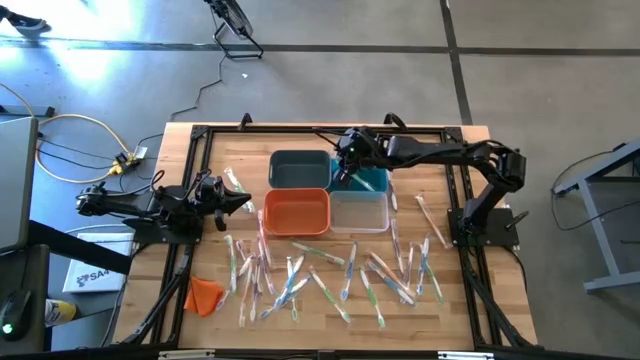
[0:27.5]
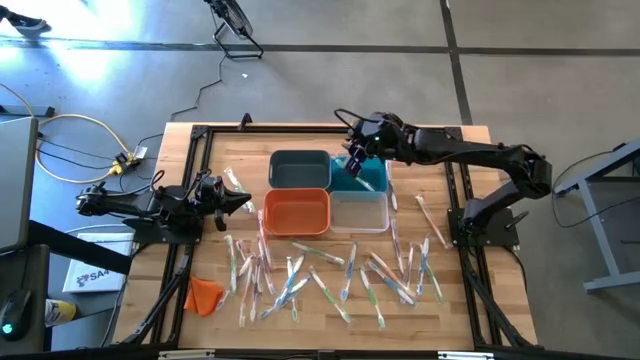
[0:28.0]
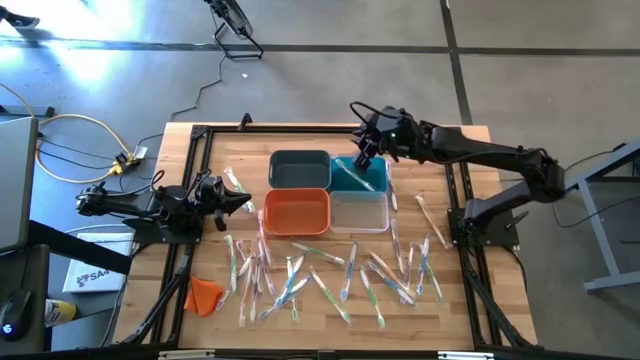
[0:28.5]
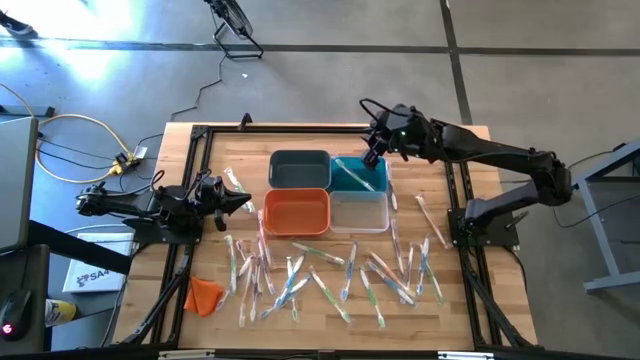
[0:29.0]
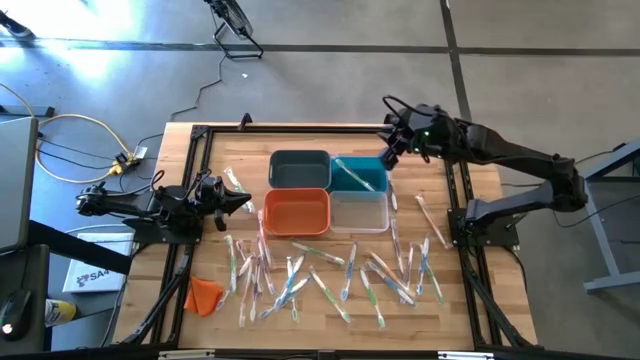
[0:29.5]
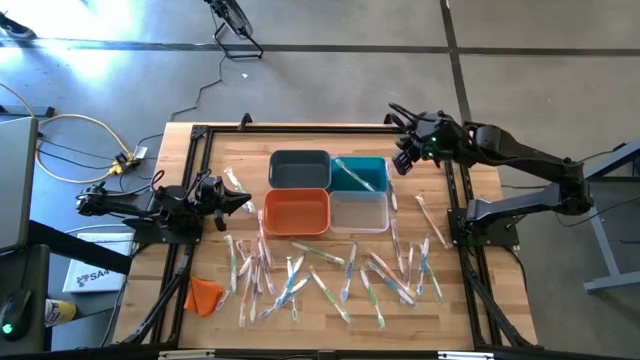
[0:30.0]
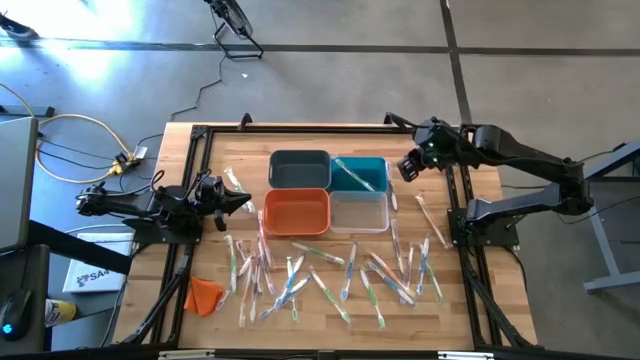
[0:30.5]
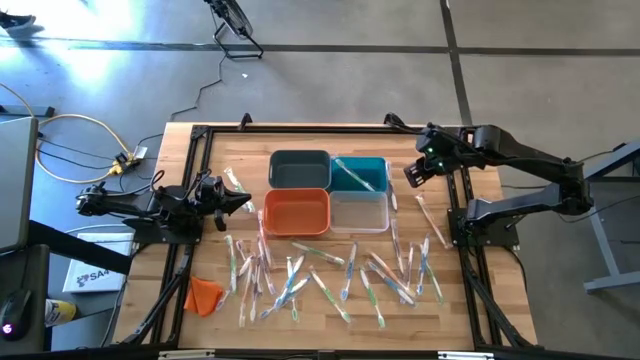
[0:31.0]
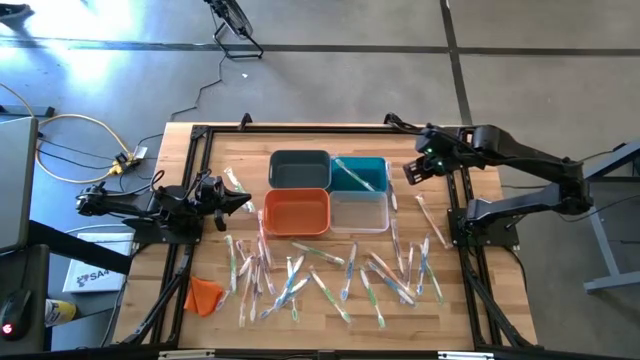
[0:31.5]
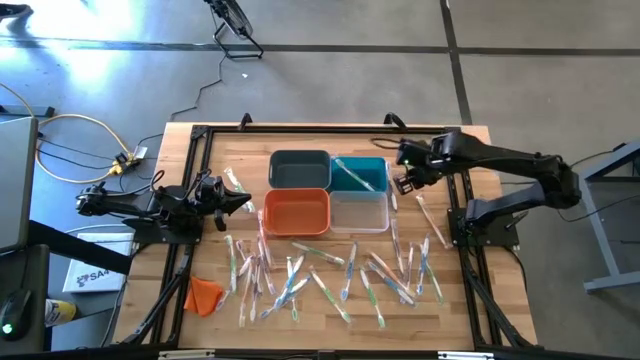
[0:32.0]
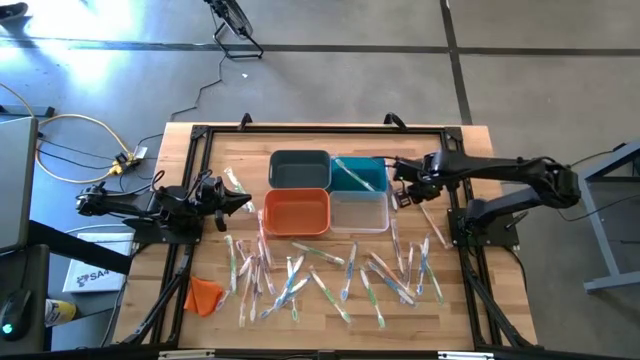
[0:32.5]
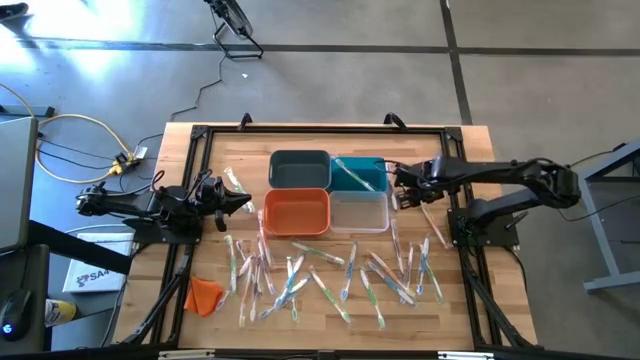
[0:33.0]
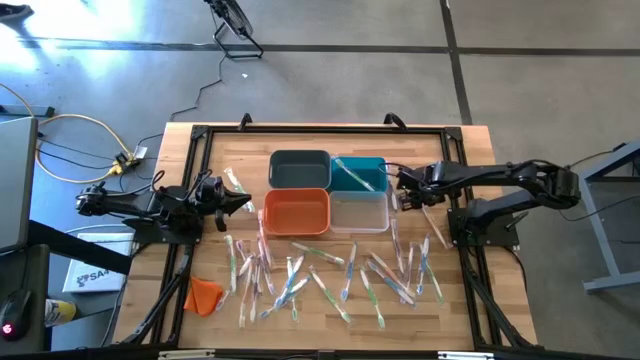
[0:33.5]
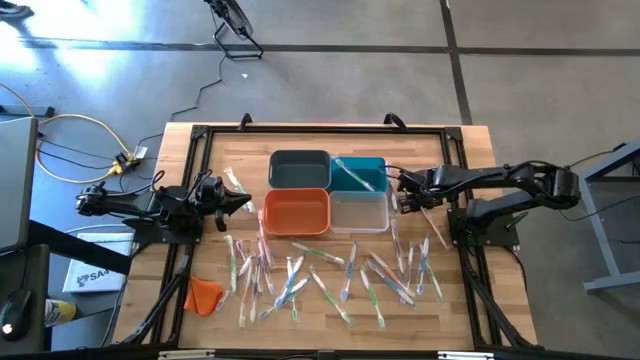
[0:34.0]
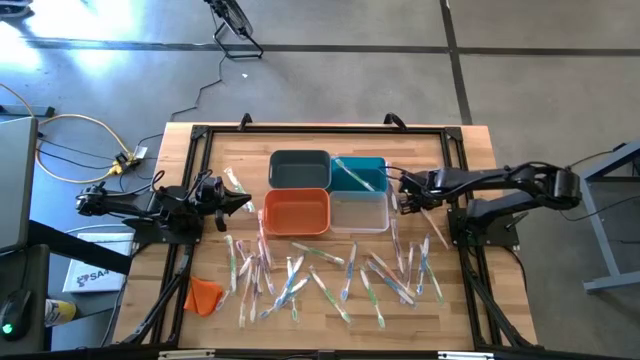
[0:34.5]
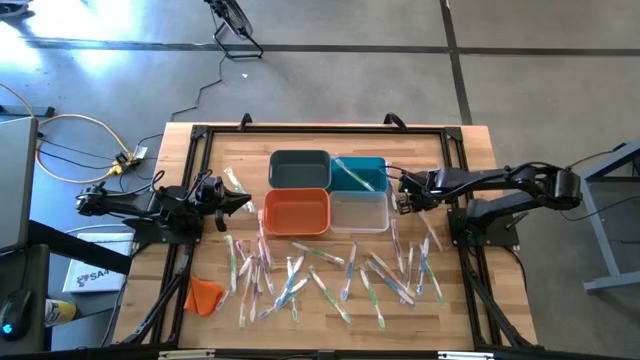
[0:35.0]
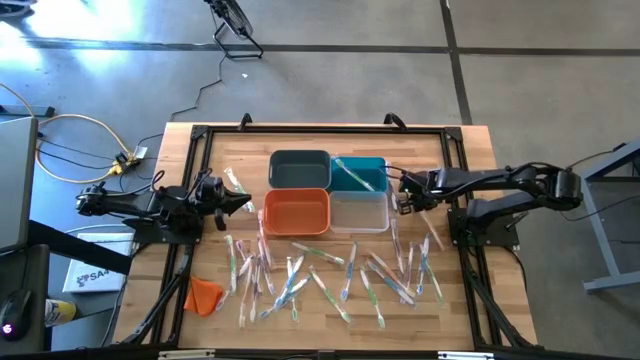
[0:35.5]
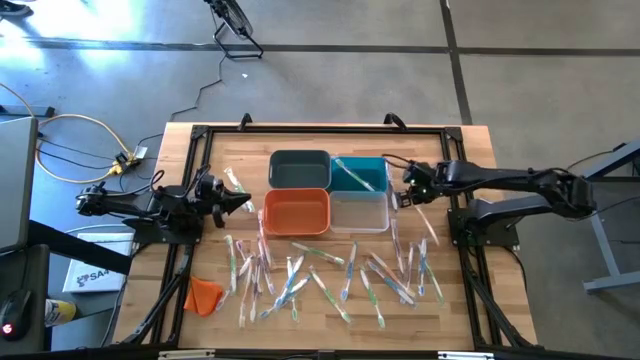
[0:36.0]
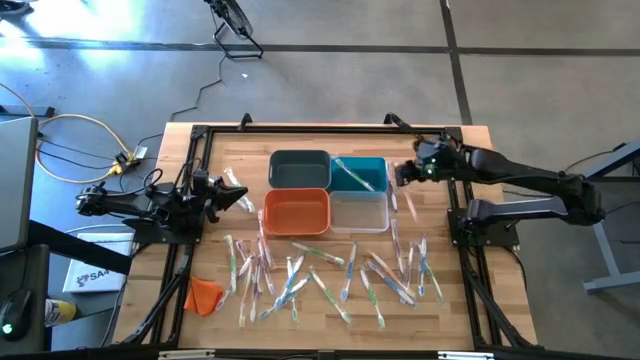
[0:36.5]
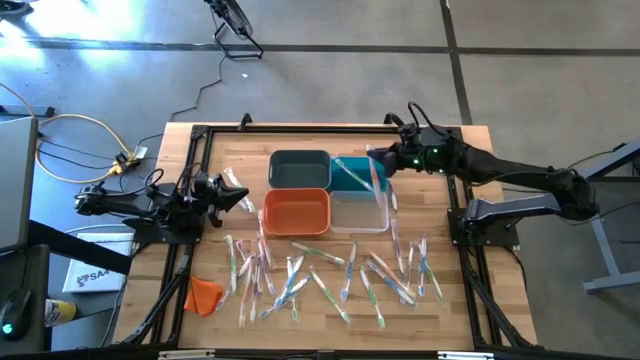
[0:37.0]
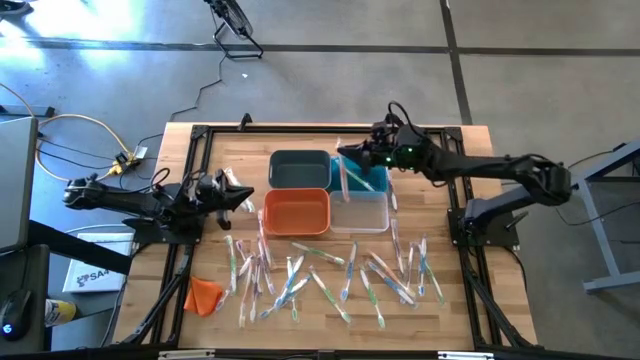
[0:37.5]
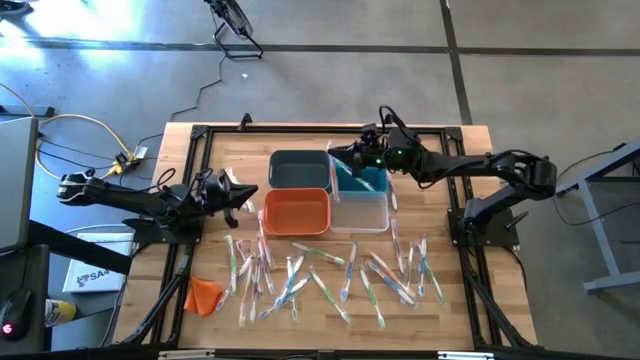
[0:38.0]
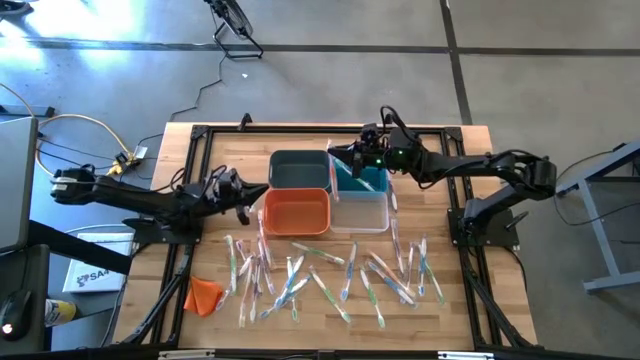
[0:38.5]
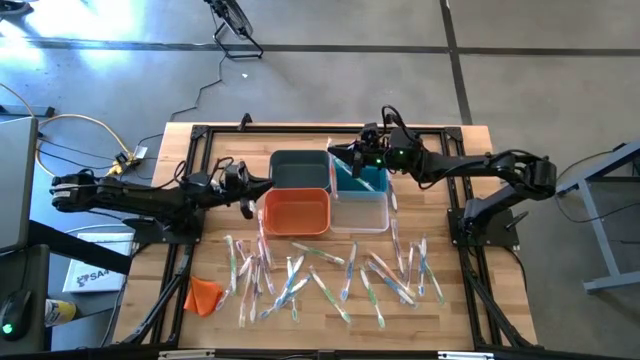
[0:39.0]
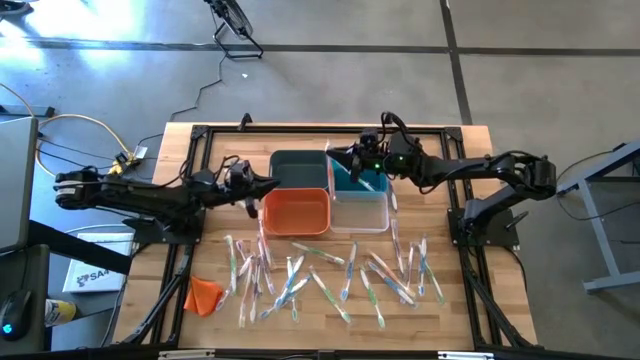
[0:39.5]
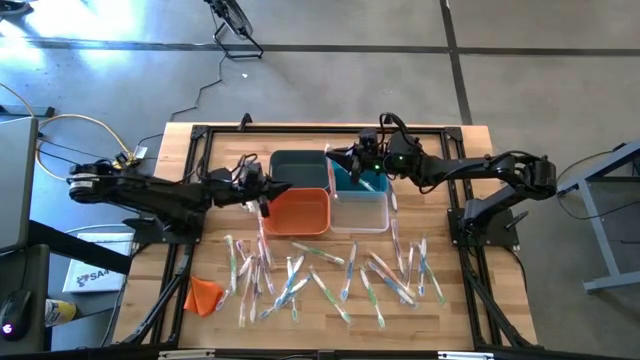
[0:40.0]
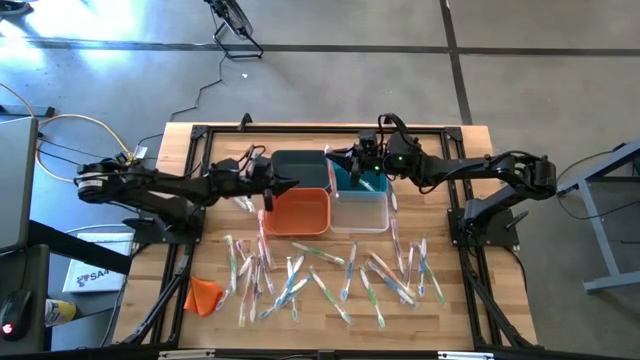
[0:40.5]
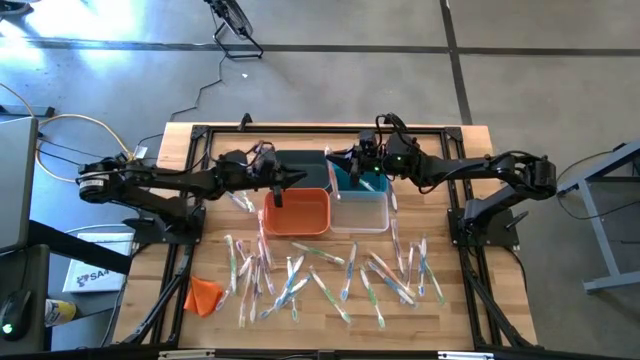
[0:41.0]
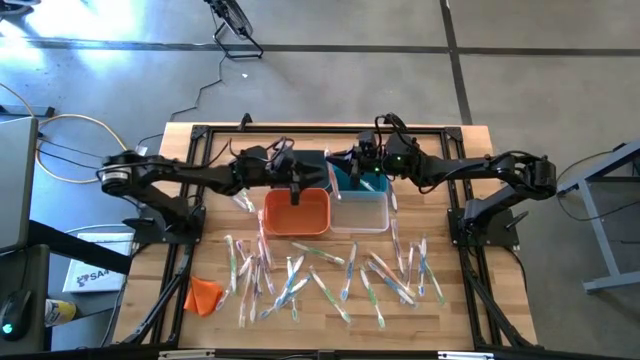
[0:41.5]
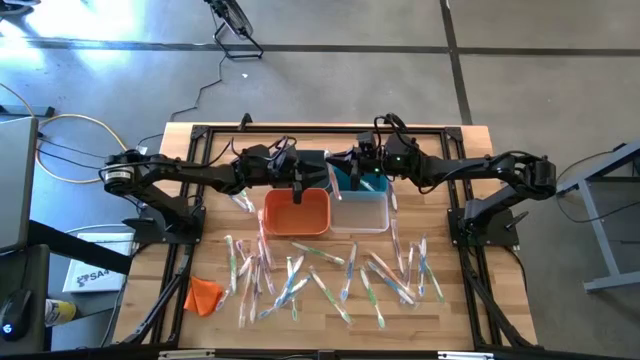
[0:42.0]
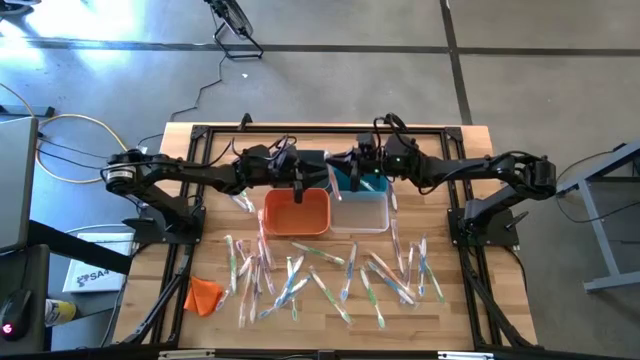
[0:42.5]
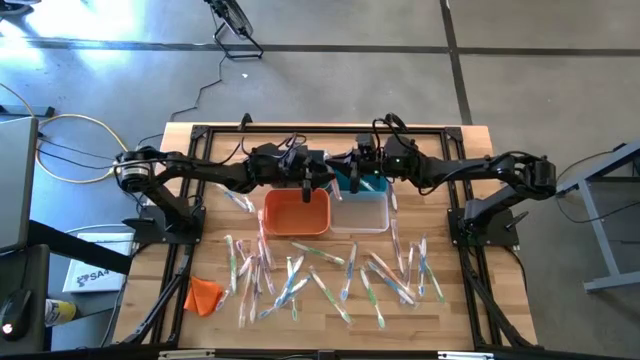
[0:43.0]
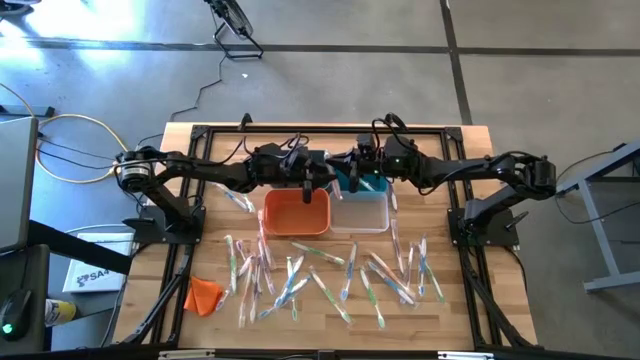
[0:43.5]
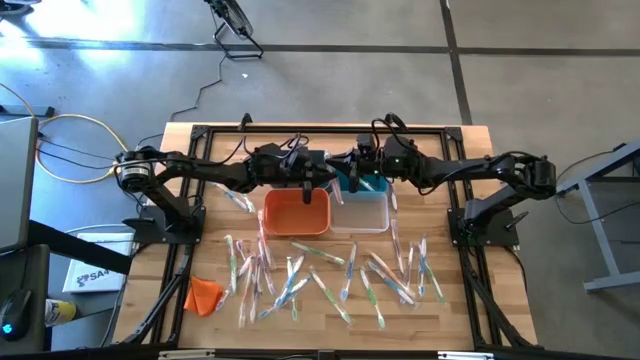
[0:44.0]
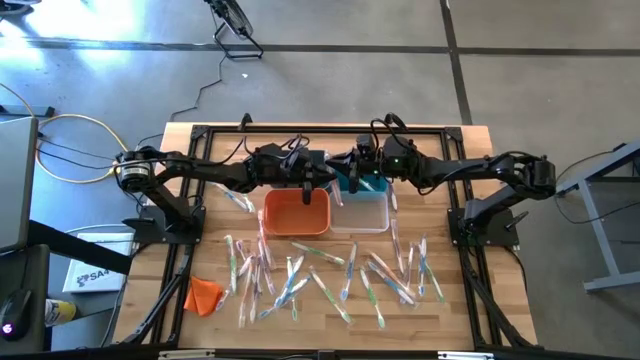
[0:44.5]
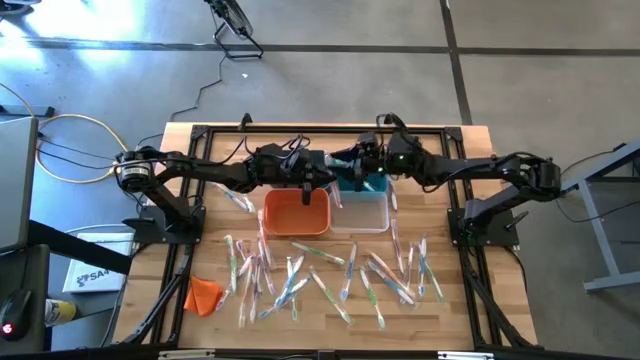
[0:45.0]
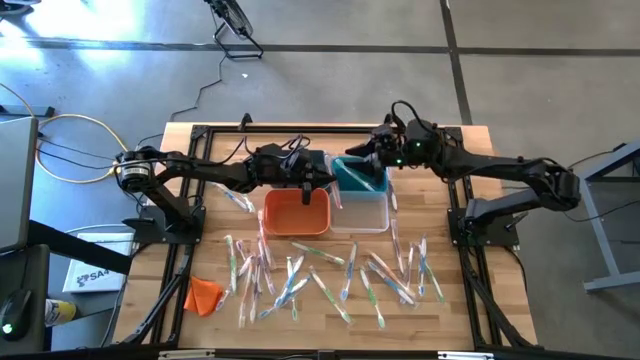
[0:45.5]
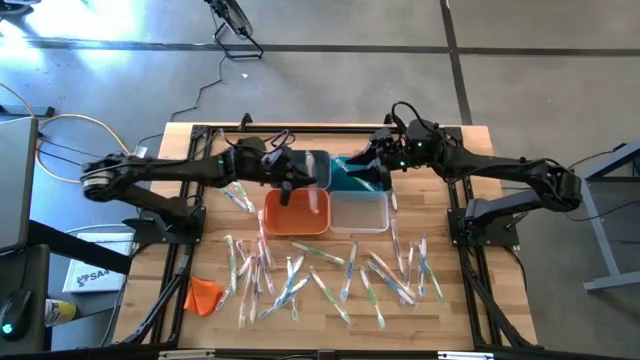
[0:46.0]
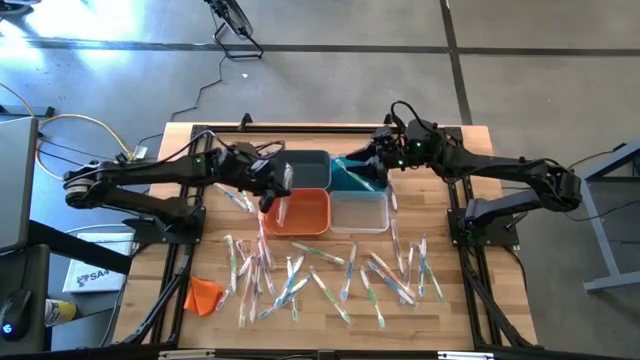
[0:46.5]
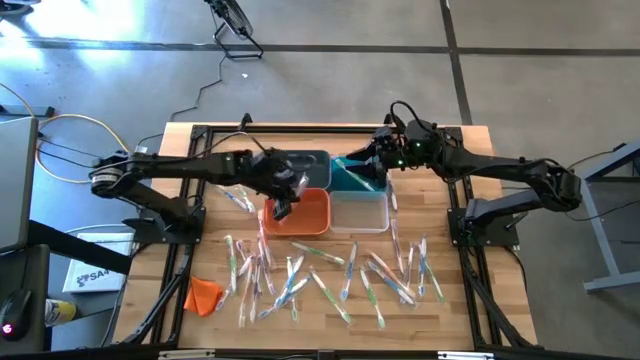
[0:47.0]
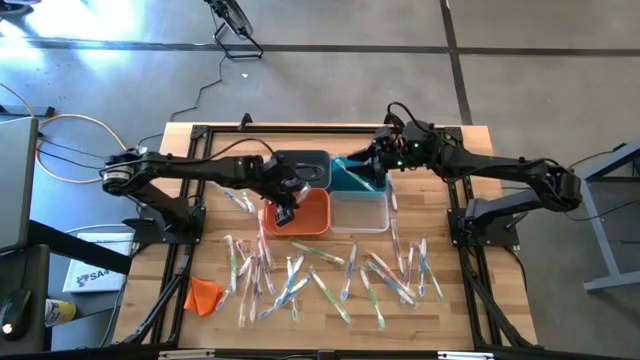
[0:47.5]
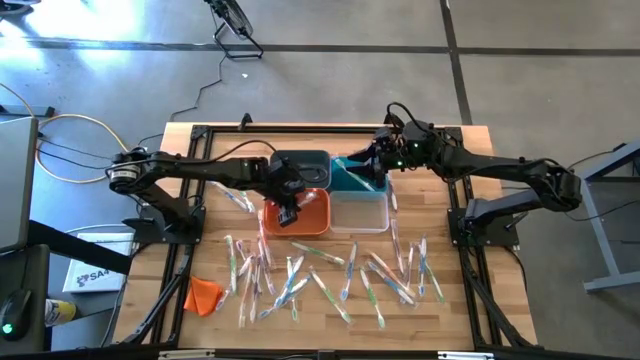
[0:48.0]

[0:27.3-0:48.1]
Task: Pick & Place Toothbrushes
Put the orange toothbrush into the orange bin
